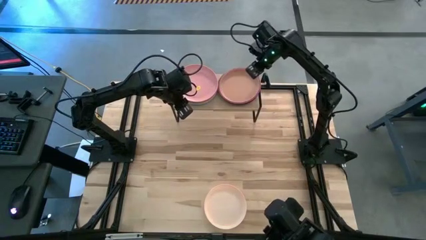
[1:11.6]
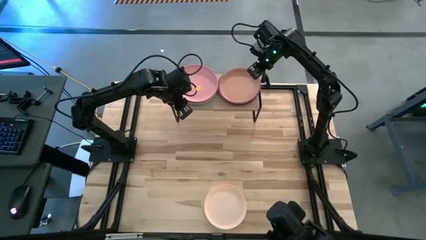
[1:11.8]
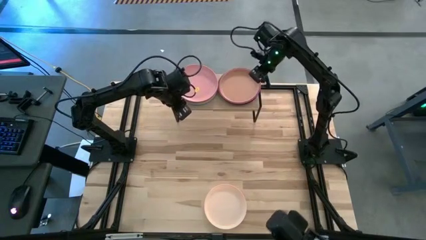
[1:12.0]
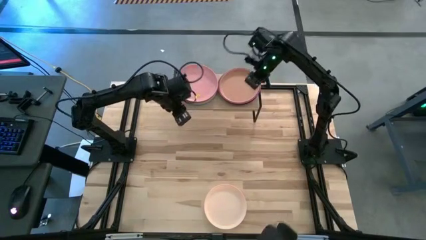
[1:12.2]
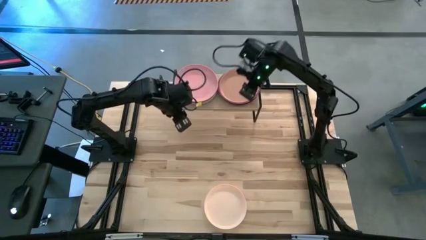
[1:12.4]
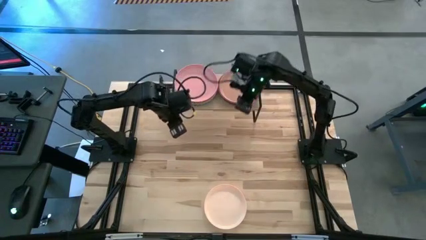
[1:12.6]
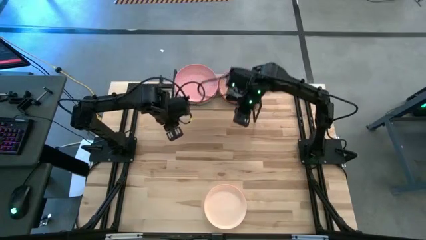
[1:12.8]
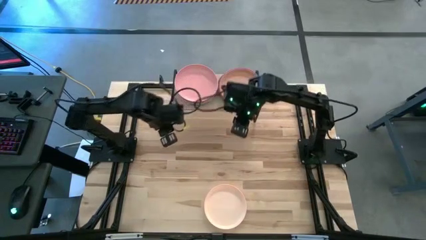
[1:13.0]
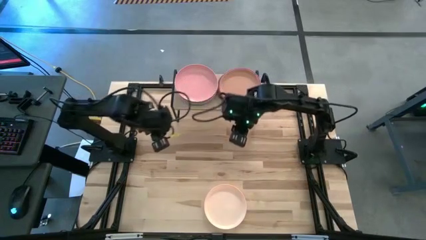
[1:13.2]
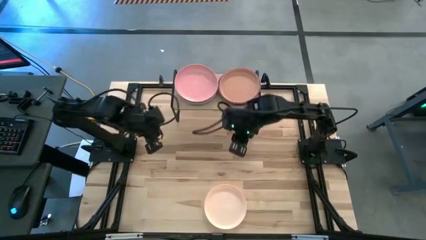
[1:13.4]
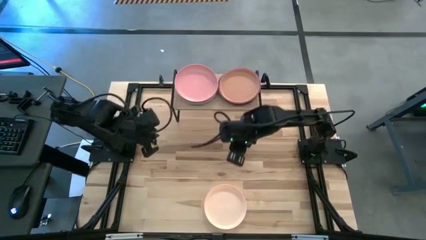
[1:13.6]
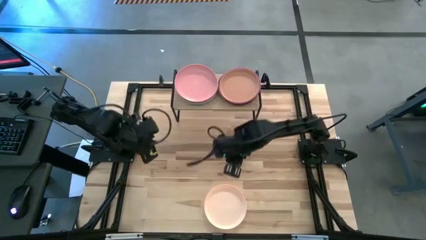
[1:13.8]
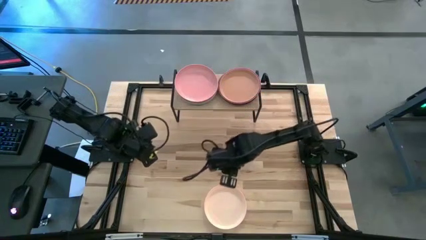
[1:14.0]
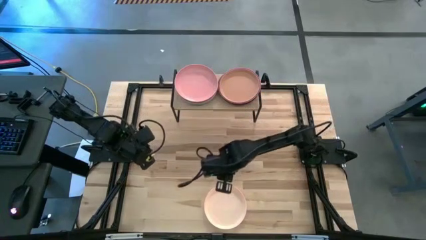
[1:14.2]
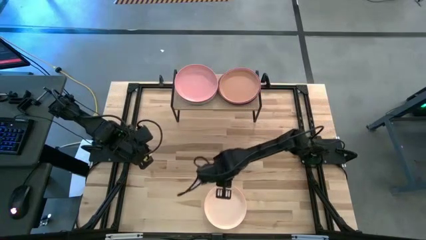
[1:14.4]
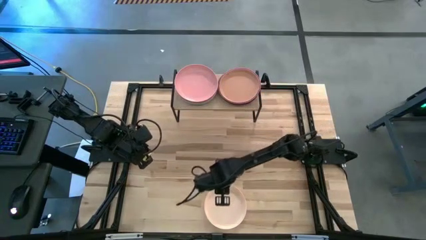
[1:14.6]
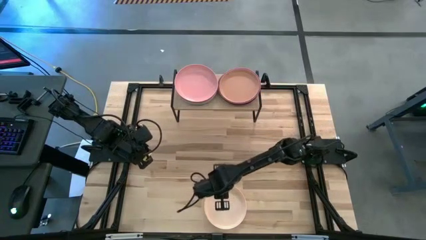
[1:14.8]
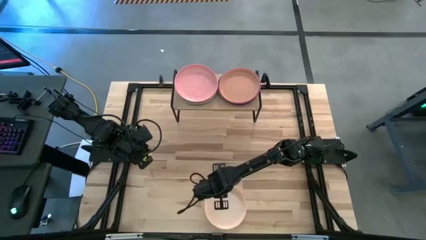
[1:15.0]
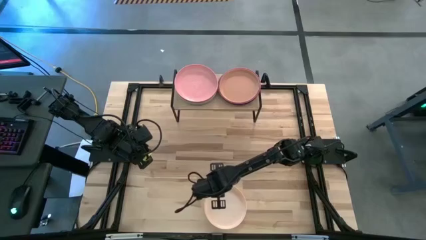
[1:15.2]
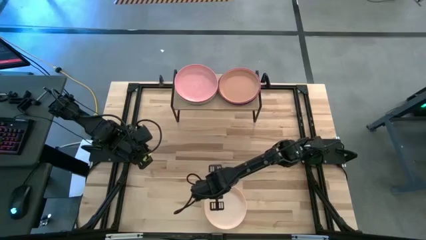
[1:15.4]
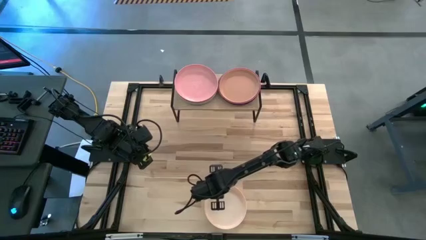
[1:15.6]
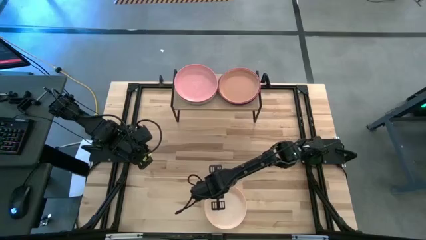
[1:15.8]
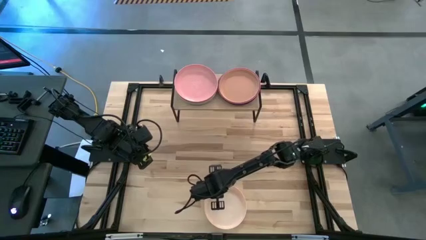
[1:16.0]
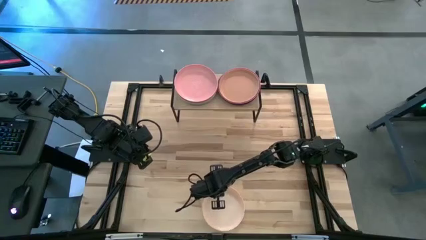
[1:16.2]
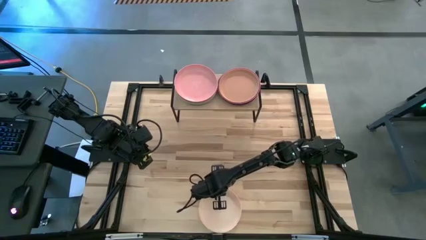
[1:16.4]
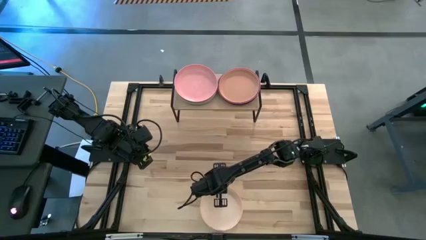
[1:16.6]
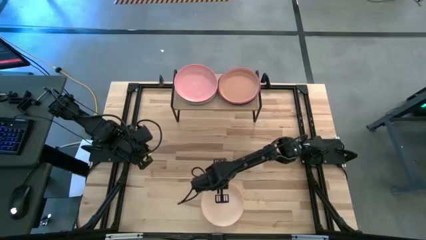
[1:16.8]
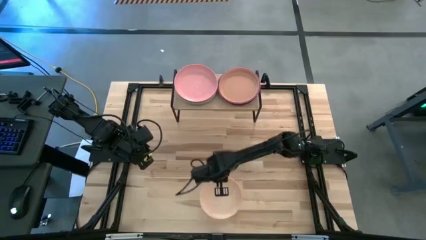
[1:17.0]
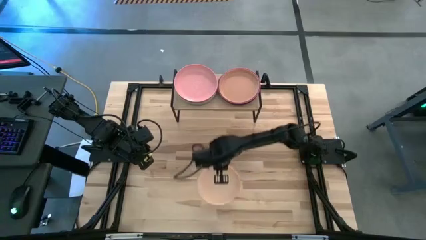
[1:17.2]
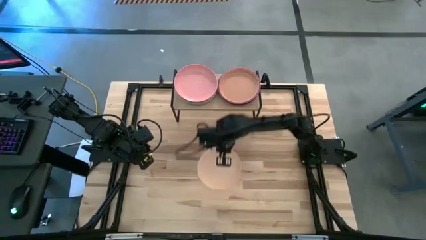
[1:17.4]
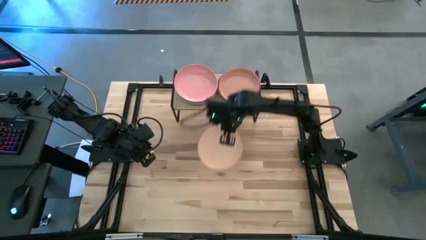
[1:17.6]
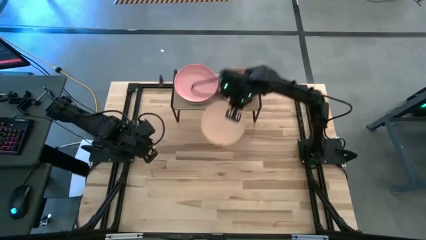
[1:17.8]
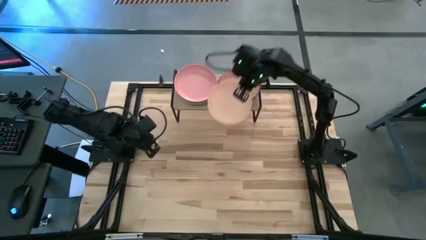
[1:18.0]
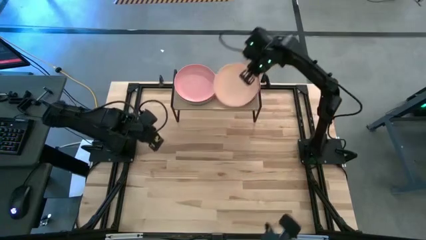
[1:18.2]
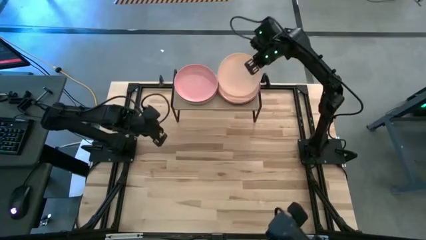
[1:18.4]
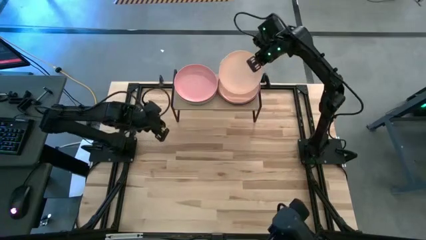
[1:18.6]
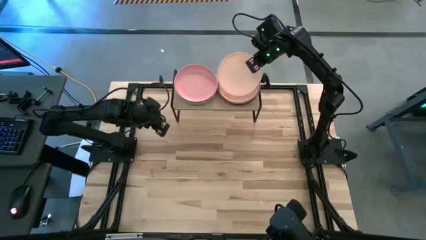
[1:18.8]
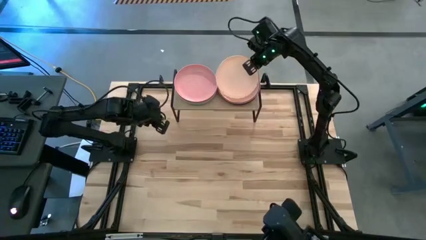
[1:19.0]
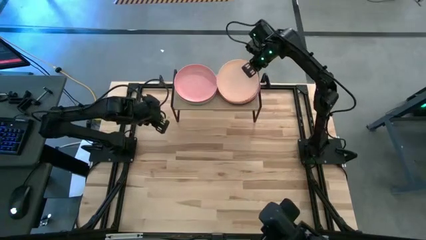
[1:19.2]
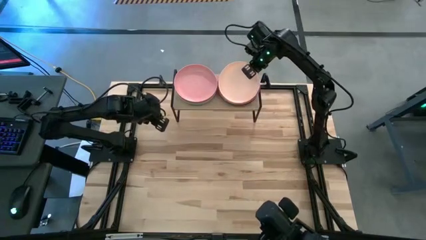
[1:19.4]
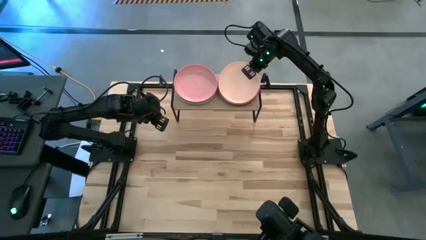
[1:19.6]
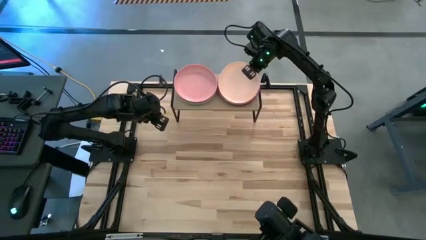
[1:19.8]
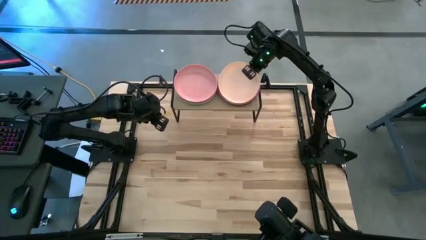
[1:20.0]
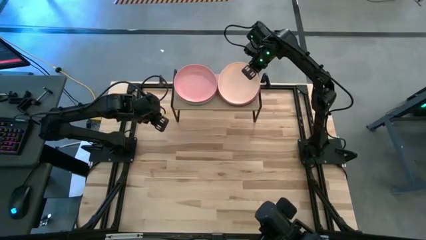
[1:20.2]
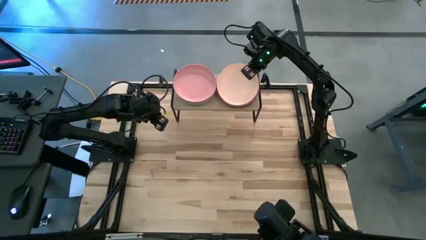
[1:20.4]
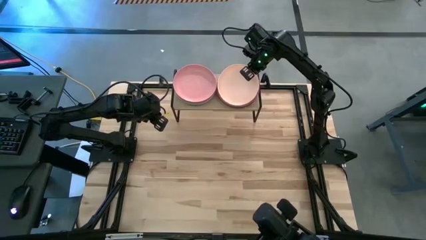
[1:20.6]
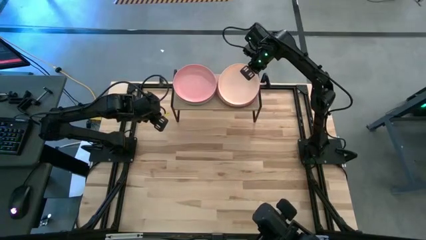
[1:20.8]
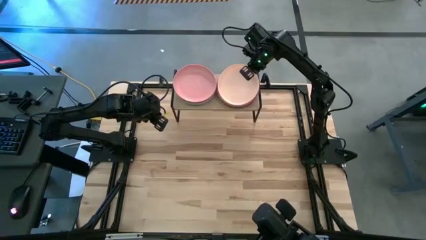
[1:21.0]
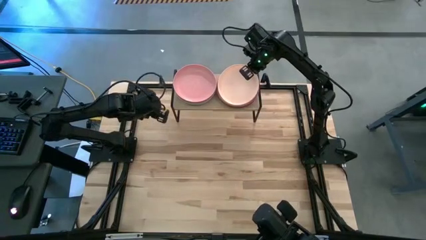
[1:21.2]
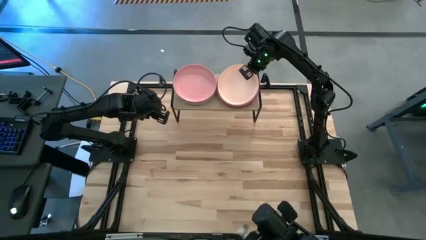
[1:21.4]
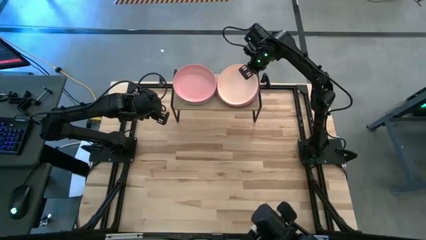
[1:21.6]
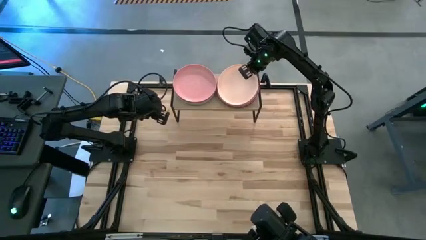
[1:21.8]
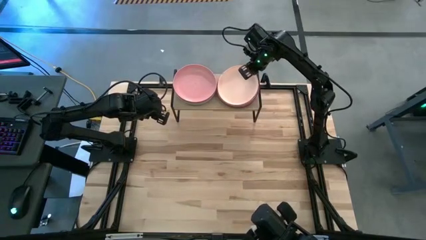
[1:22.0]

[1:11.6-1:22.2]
Task: Place and stack plates onto a shelf
Stack the light orange plate on top of the brown plate

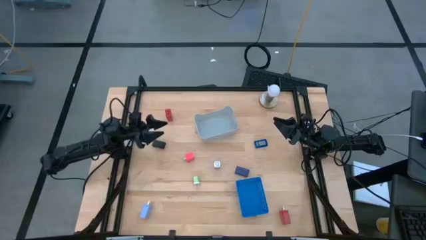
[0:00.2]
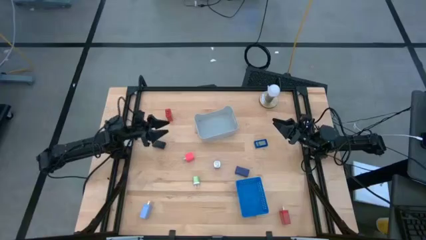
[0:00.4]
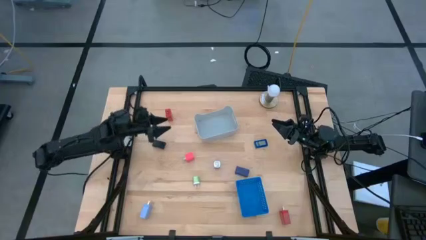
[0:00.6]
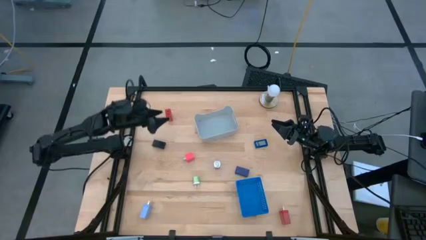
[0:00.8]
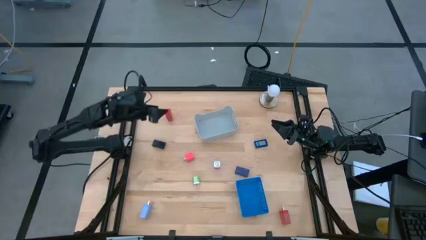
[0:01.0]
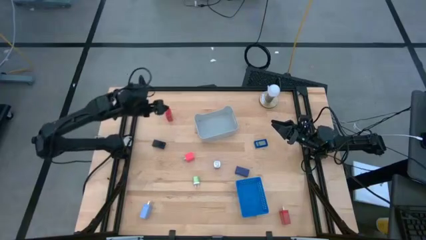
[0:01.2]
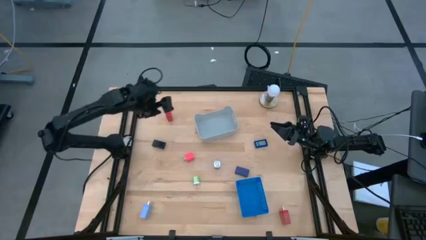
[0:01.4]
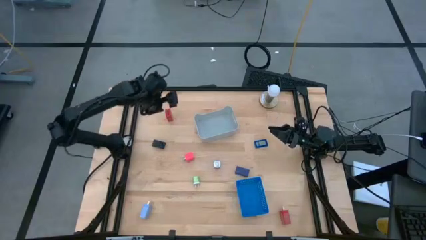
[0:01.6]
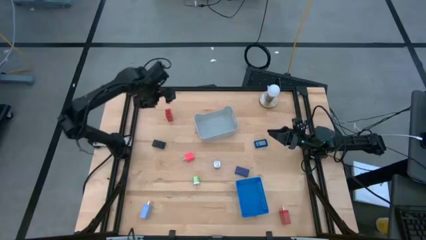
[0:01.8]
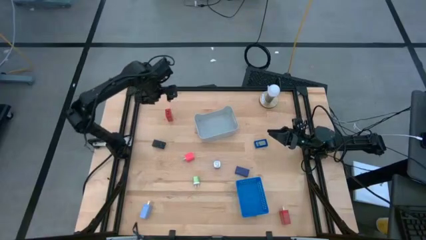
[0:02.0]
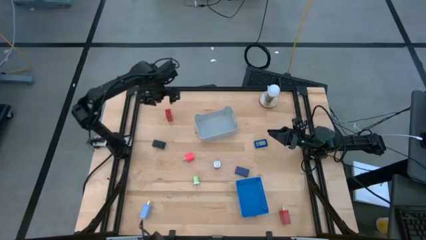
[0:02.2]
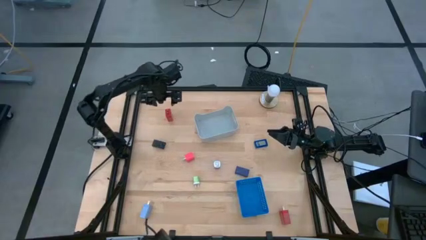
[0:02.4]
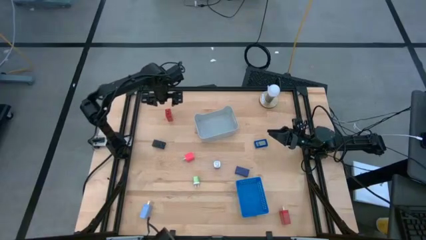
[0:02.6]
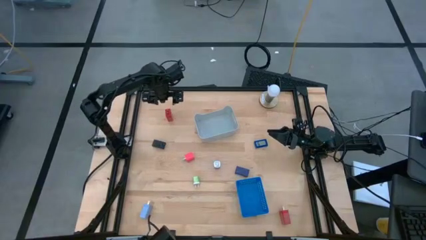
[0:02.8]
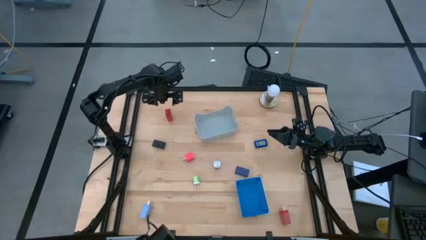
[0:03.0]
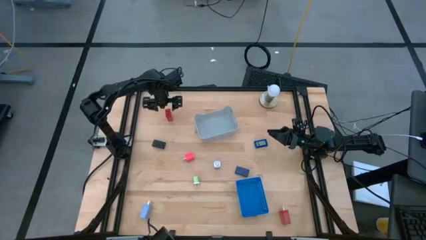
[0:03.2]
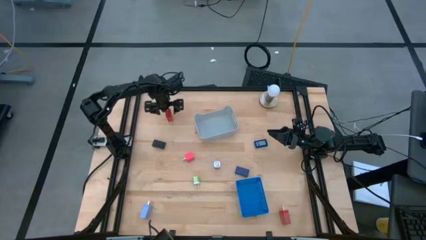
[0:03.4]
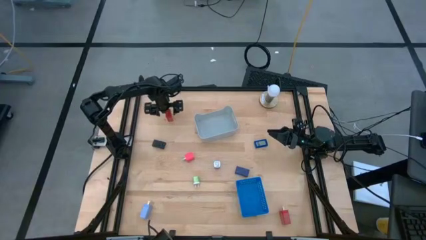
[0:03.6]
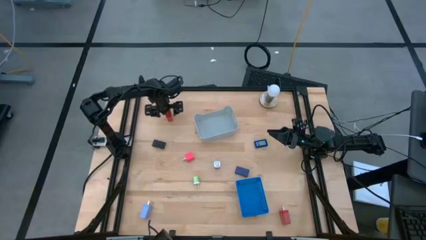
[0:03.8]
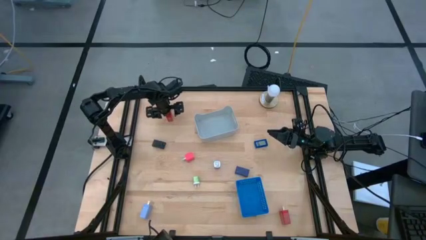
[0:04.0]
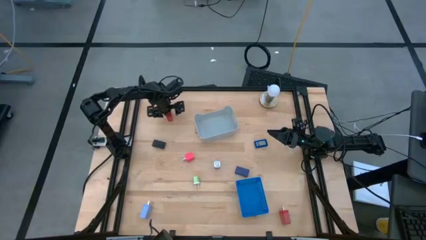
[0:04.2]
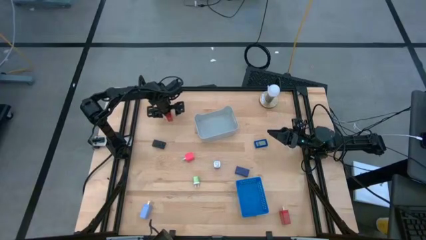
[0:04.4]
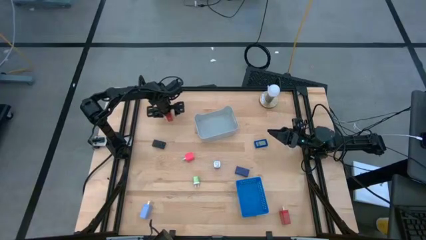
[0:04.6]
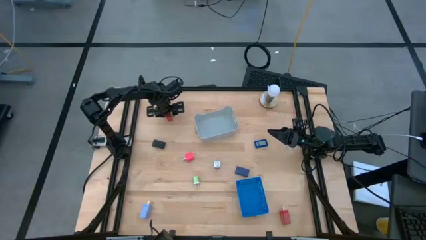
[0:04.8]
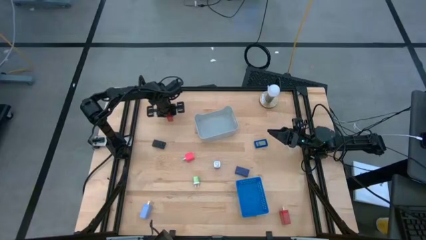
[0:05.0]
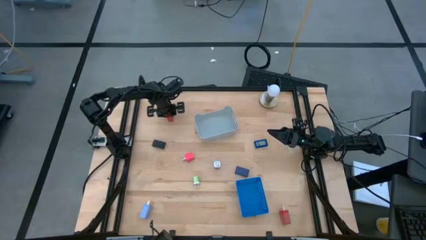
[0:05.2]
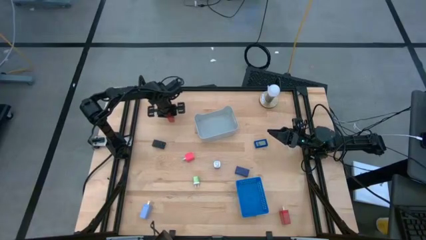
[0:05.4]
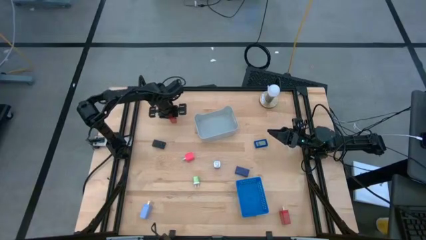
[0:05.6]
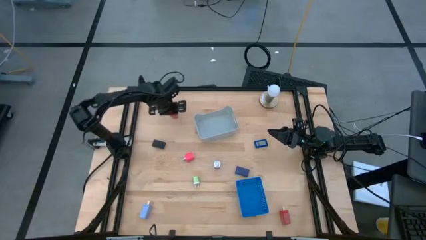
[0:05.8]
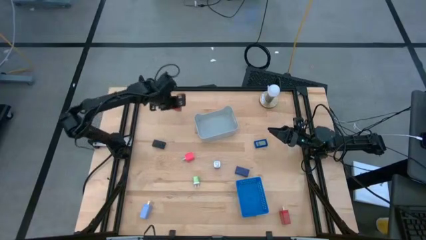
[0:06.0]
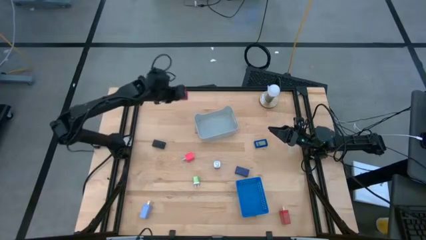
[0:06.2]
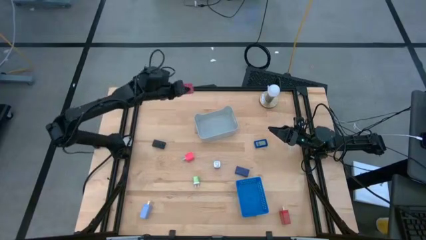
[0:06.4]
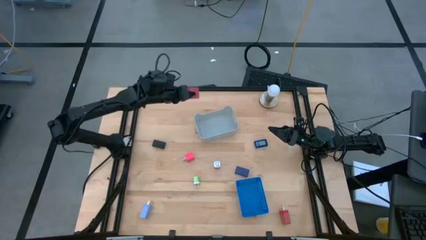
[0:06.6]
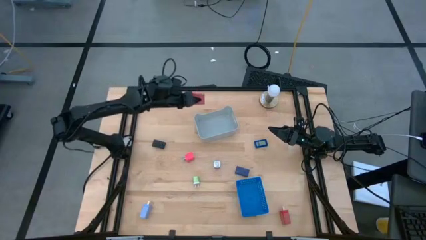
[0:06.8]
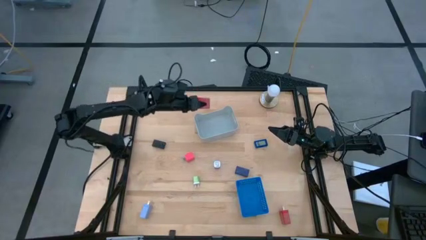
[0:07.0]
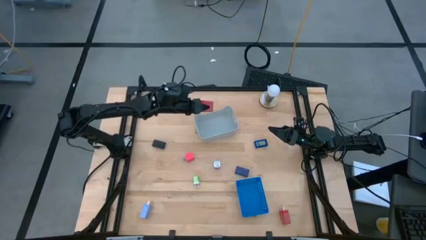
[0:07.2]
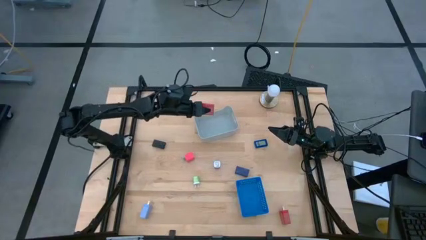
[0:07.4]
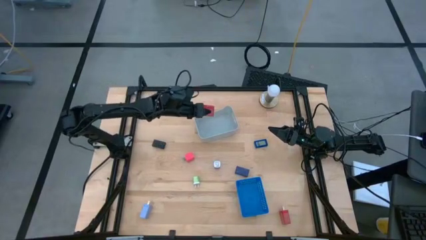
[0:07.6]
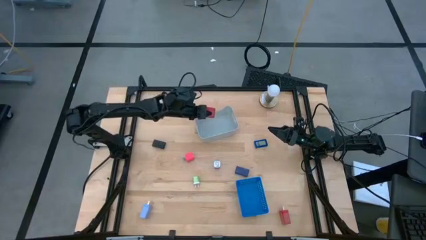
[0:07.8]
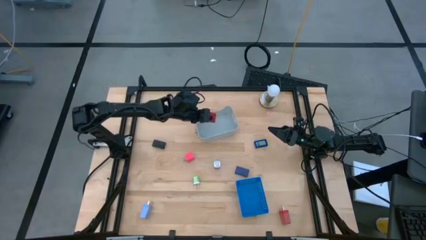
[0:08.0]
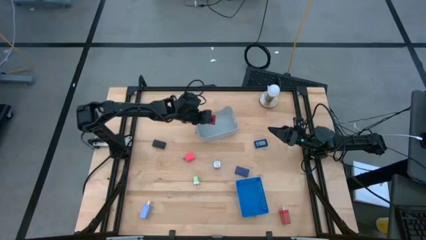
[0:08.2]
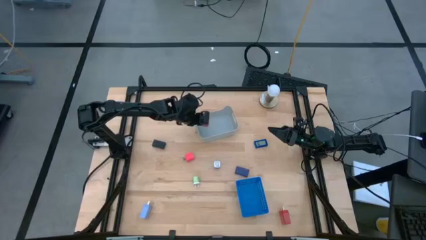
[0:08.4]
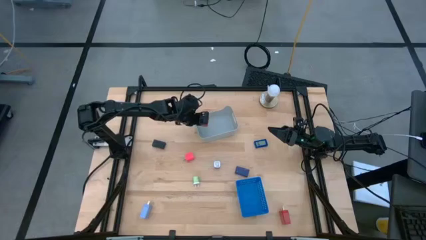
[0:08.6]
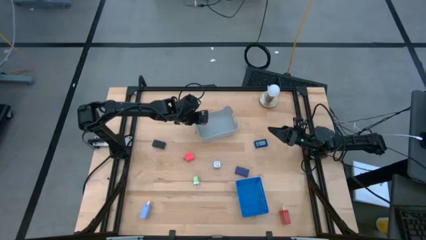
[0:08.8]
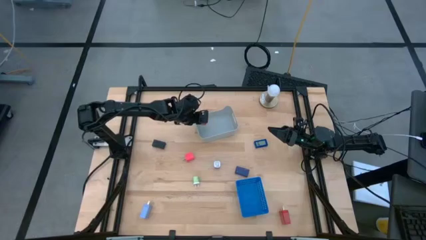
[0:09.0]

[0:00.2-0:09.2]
Task: Pick & Place Office items
Put the top red charger adapter into the gray bin
